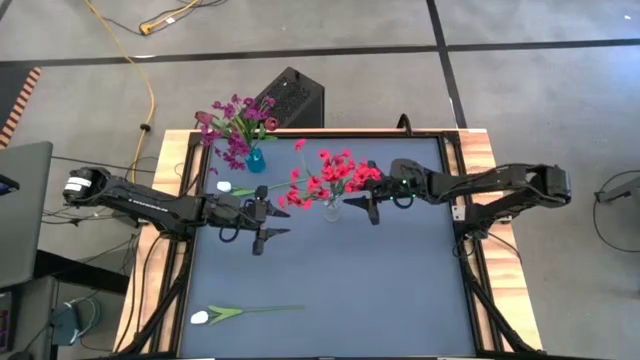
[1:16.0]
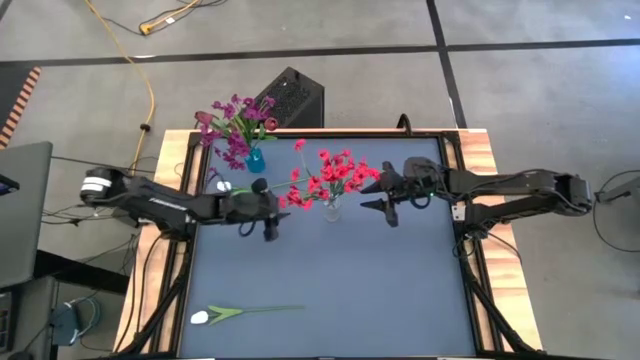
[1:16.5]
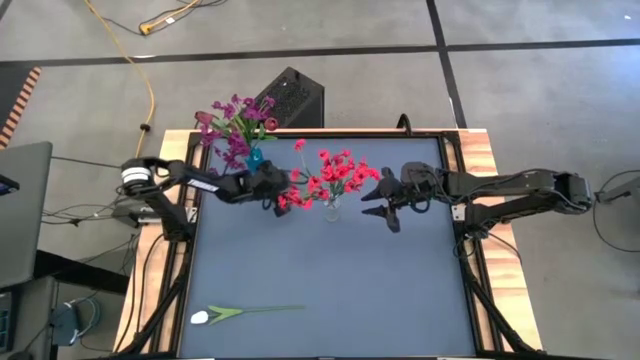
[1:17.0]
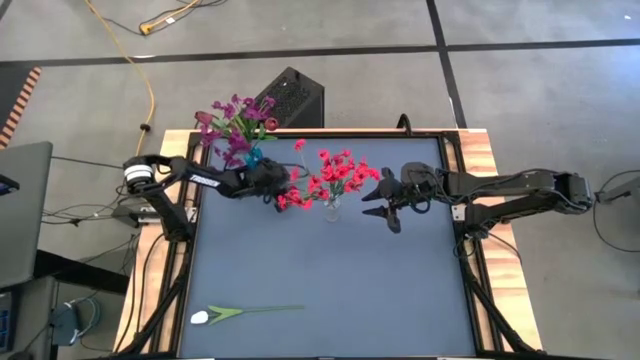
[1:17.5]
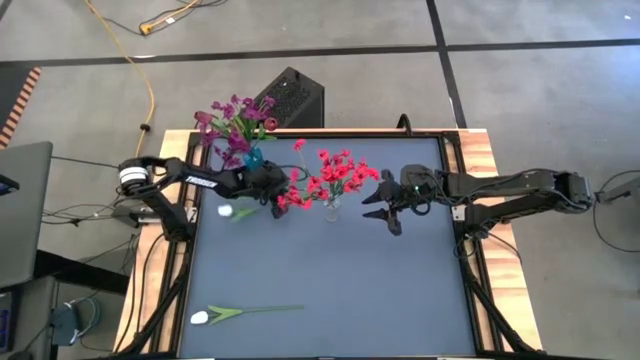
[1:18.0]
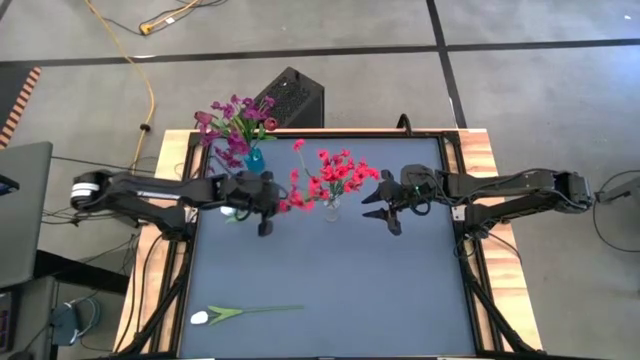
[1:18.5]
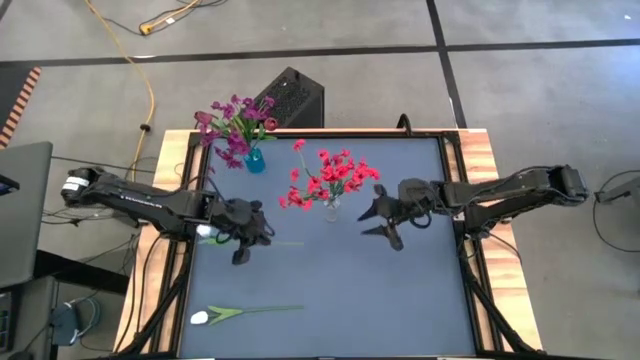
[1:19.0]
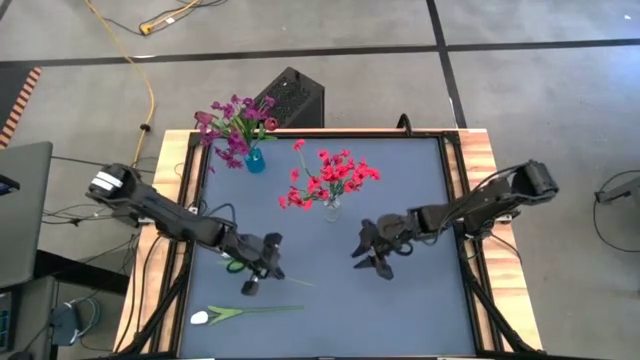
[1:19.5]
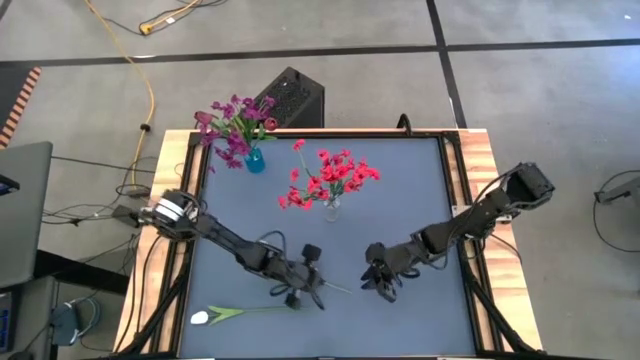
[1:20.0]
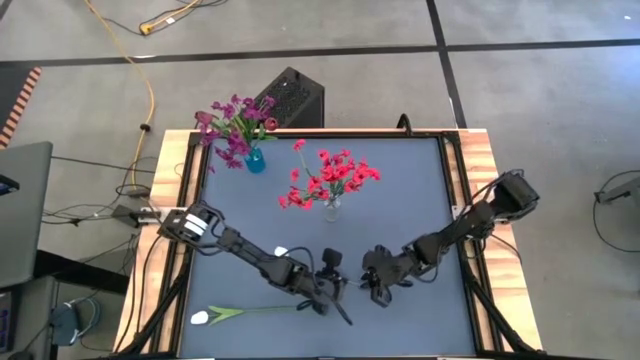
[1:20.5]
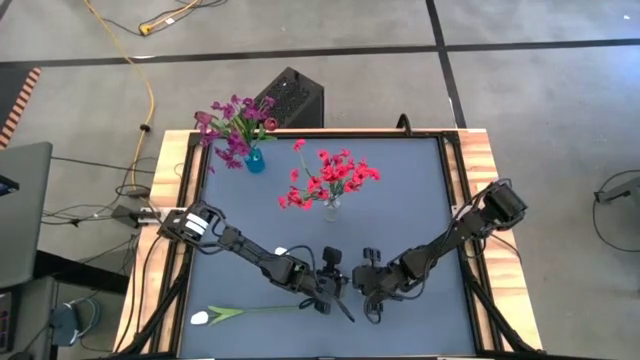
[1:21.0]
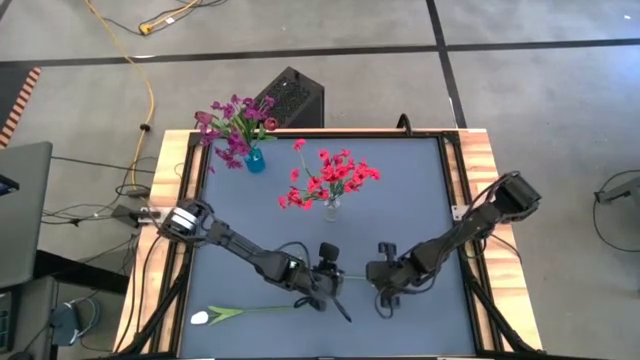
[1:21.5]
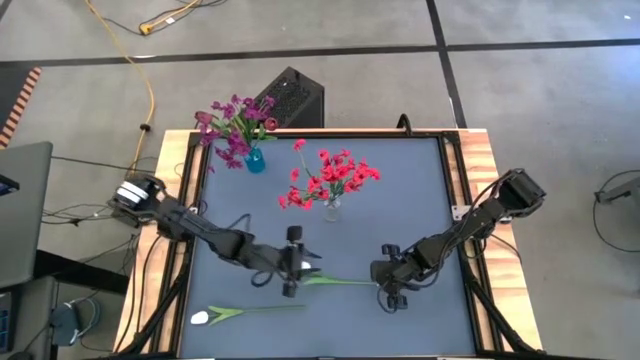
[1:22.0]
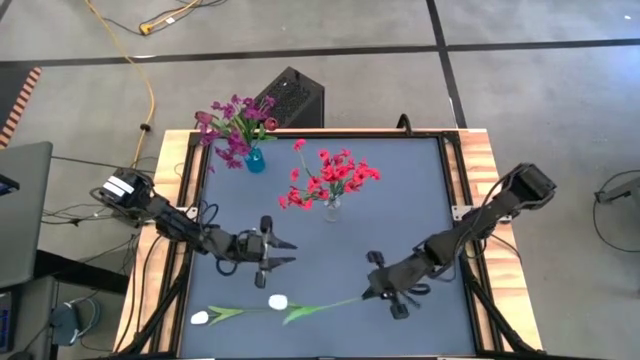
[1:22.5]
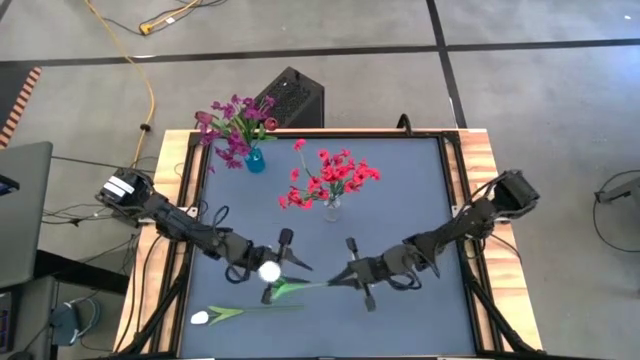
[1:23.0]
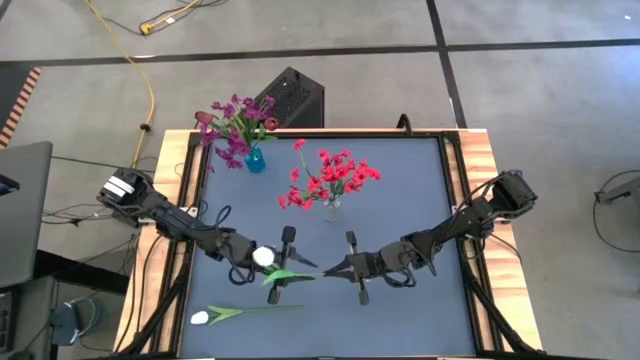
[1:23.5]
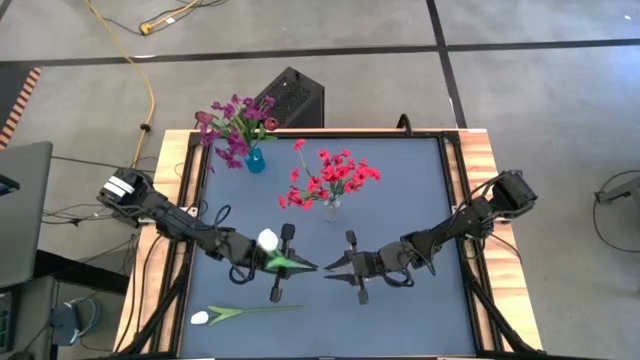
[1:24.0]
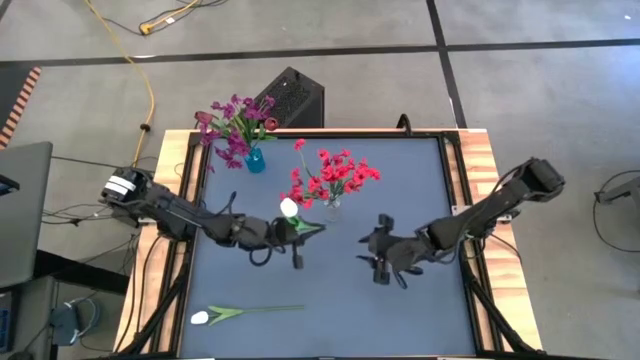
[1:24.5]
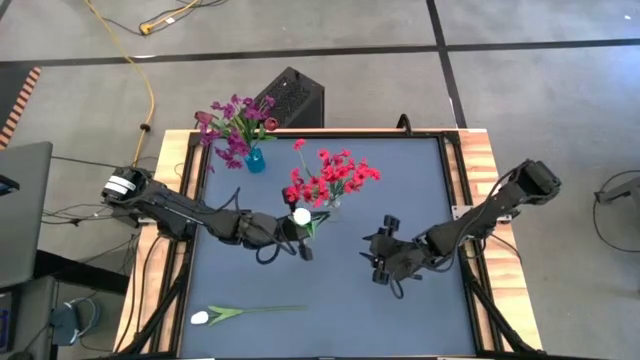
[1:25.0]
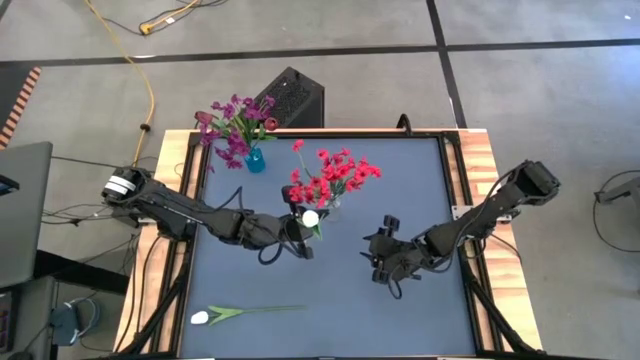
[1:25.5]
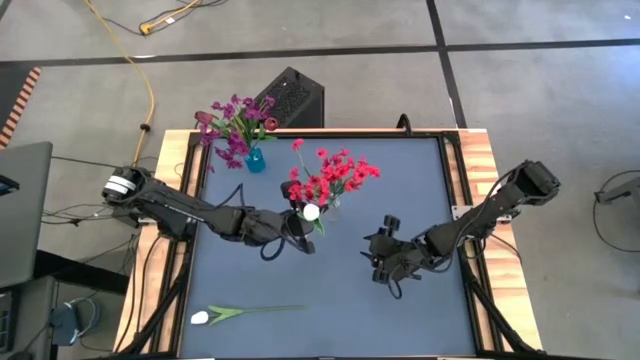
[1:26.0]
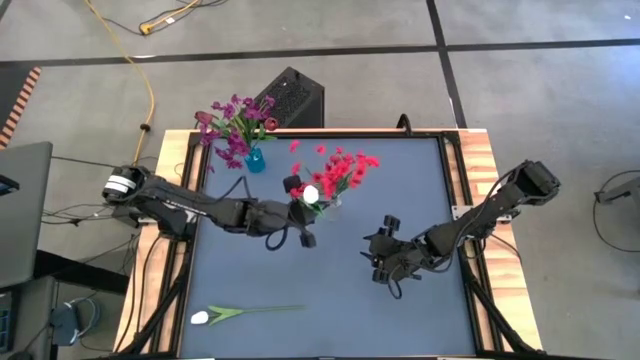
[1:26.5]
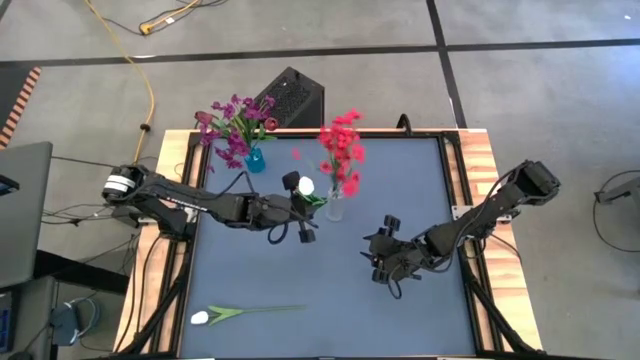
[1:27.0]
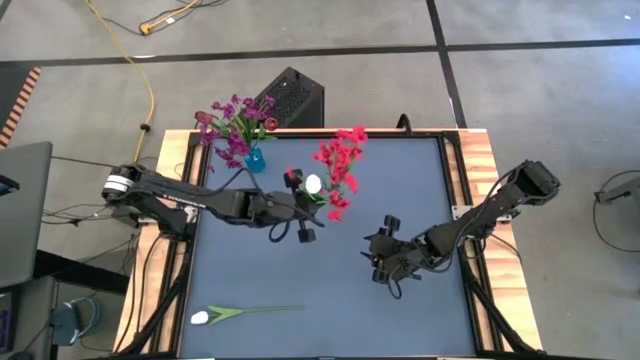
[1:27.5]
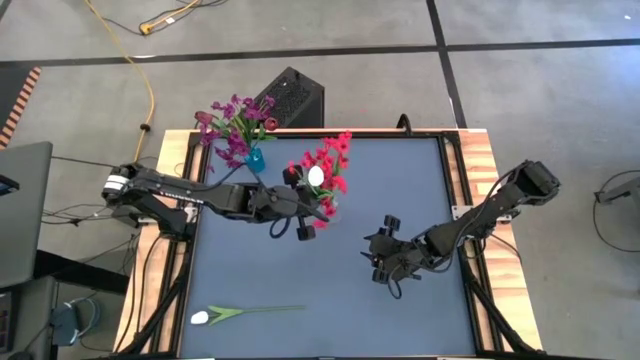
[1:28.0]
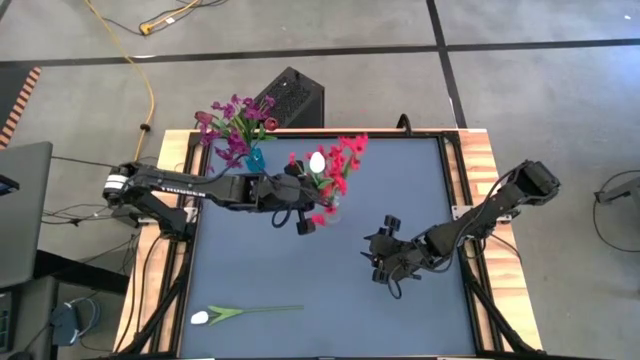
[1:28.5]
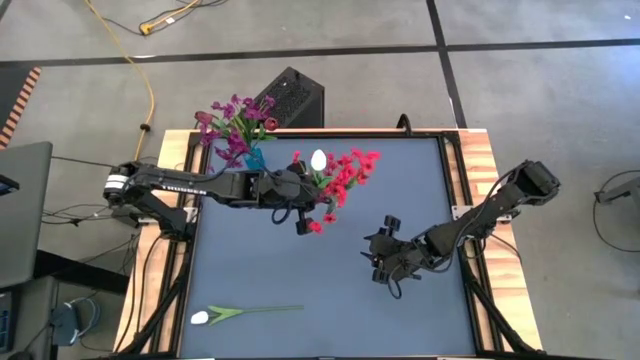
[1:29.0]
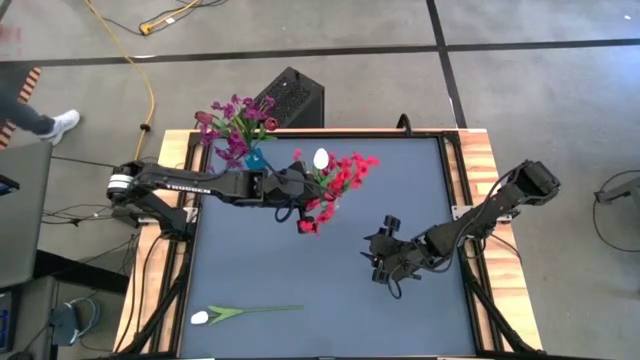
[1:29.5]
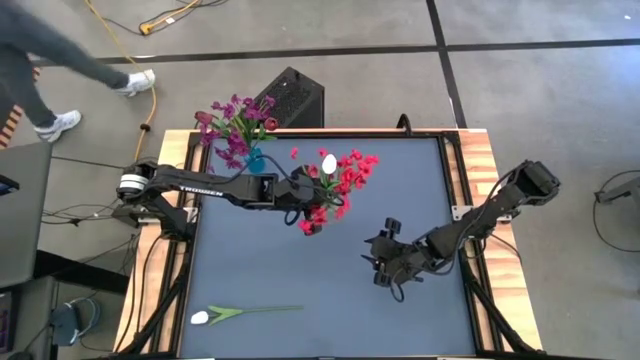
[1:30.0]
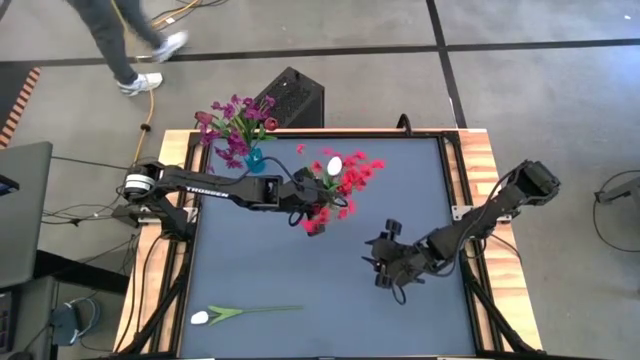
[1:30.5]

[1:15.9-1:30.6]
Task: Sort flowers into vase by color
Put the top white tulip into the transparent vase

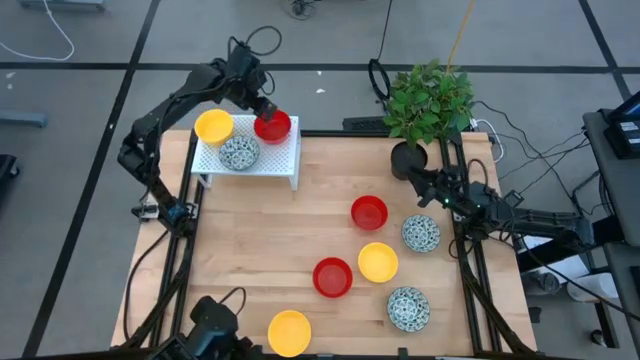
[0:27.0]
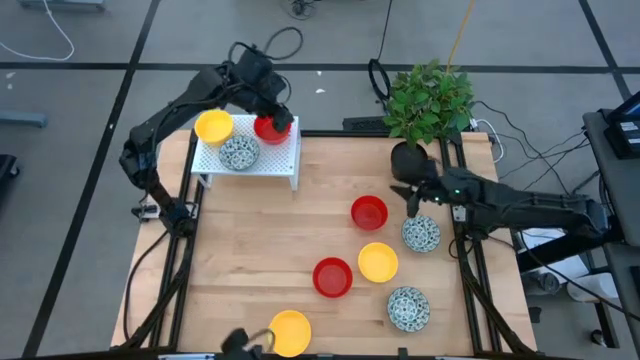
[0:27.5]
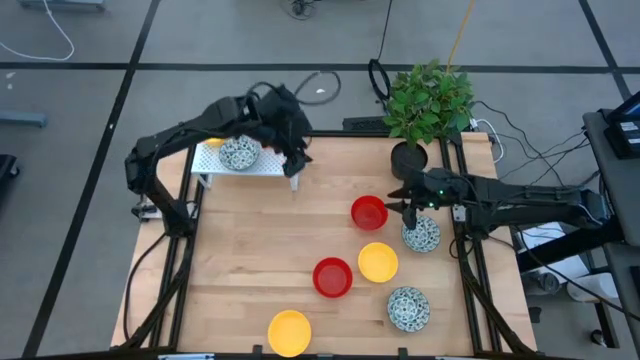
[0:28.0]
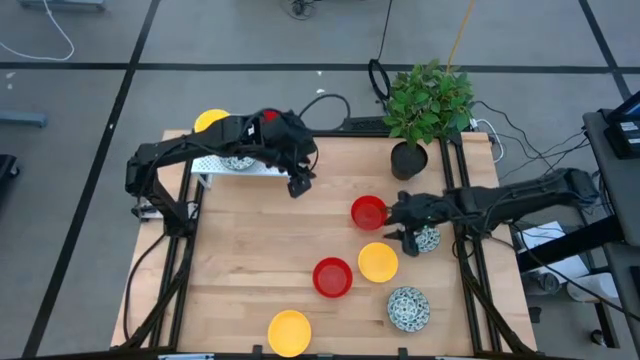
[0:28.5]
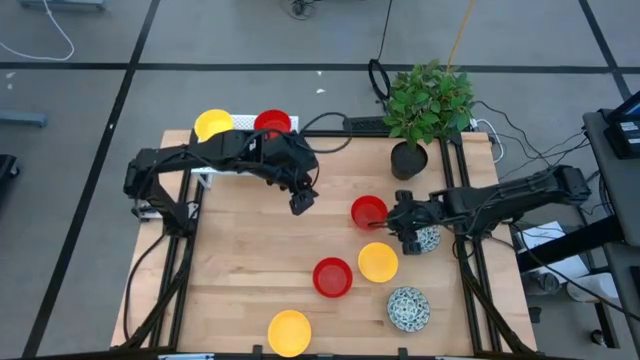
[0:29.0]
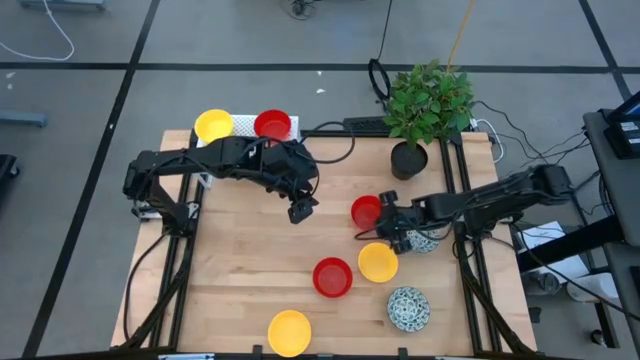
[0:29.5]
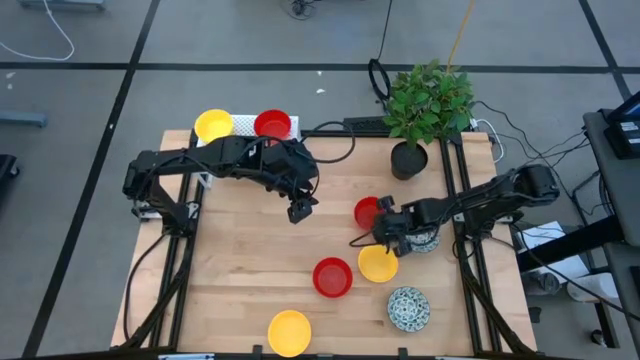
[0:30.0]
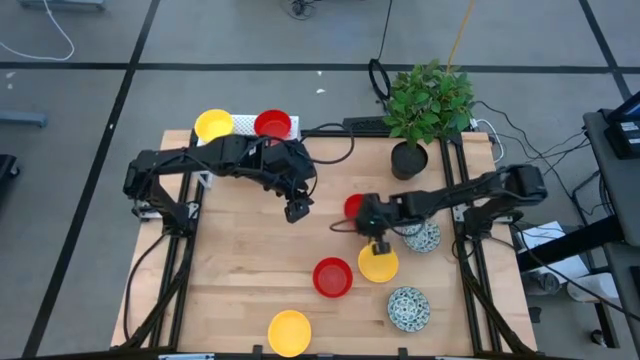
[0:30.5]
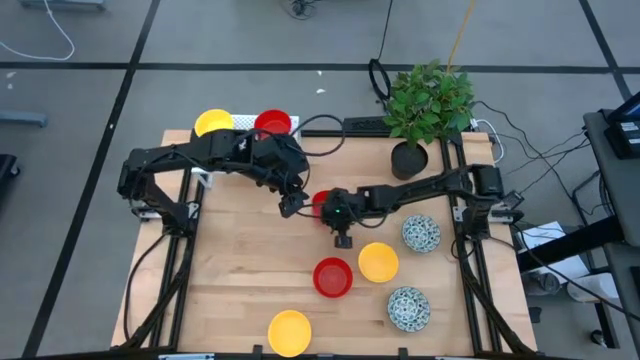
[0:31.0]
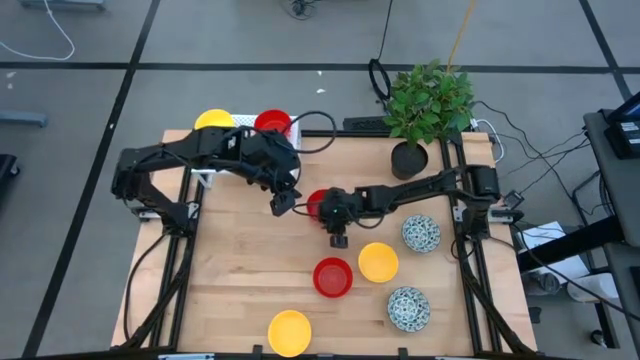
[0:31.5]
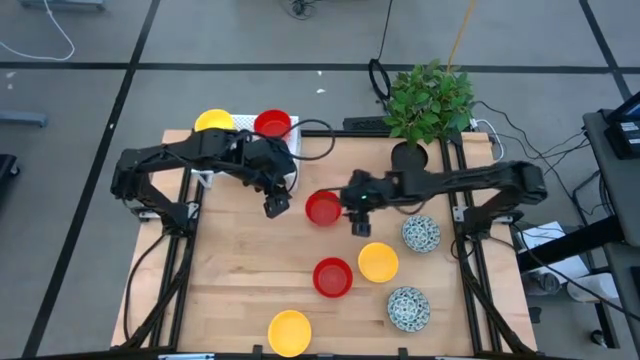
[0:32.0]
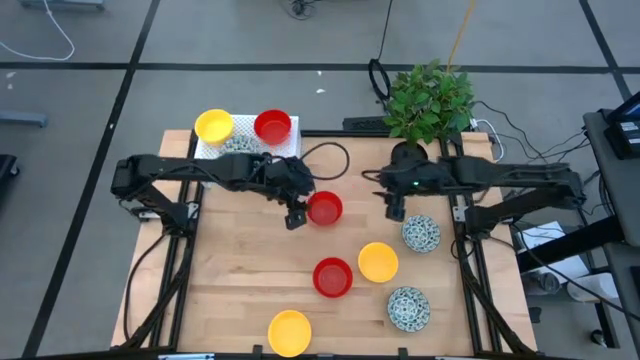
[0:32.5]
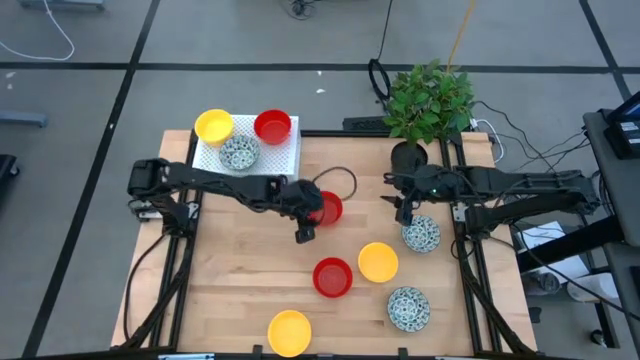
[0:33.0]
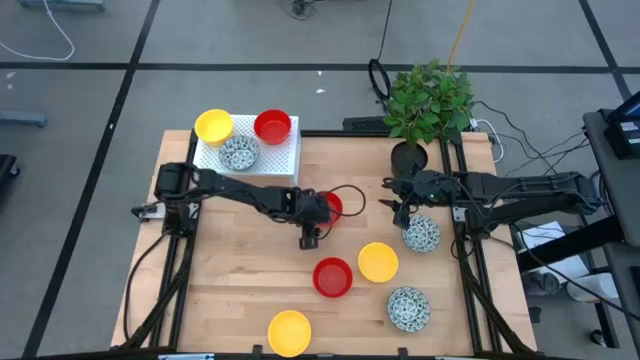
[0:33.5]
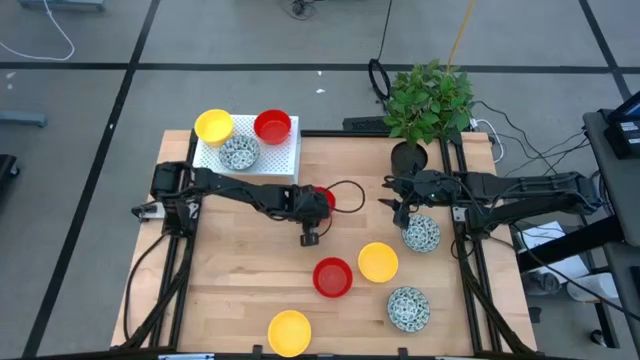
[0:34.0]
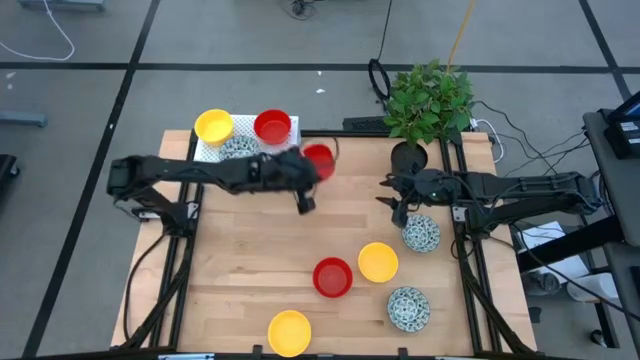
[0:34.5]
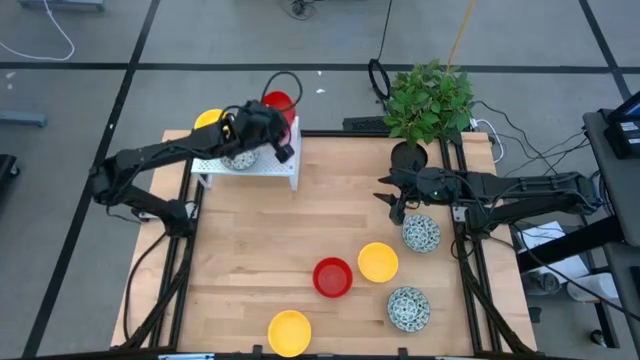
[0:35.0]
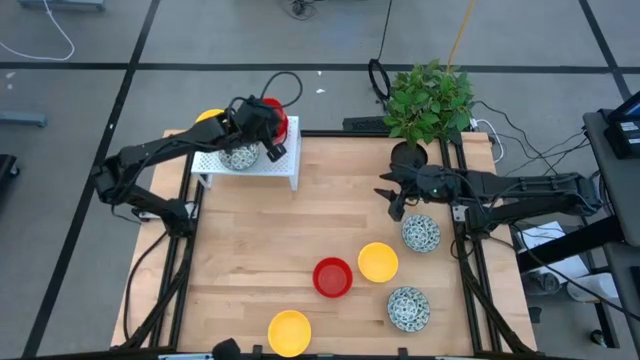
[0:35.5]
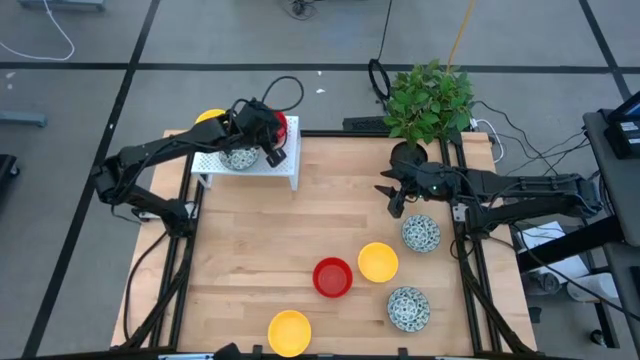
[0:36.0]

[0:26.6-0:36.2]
Task: Pick & Place Mini bowls
Stack the red bowl on the red bowl on the shelf
